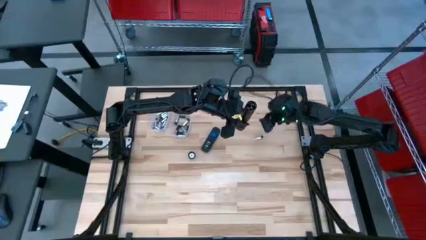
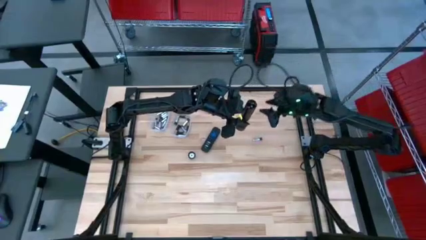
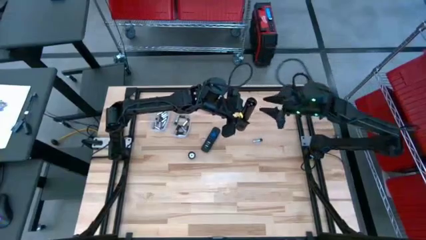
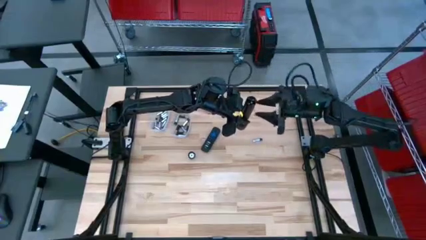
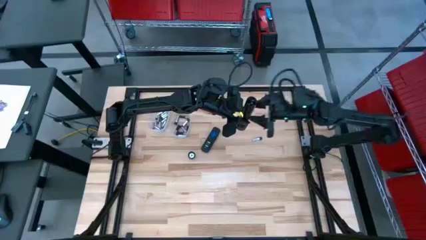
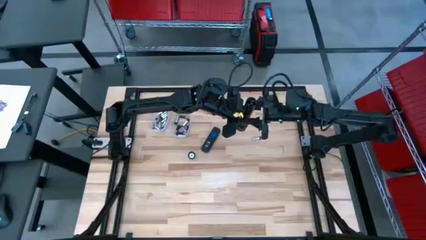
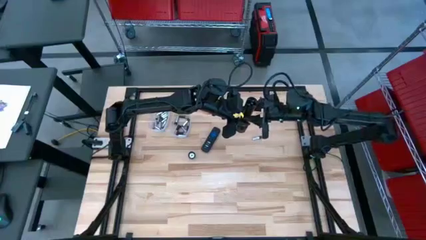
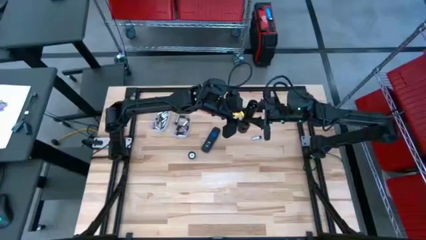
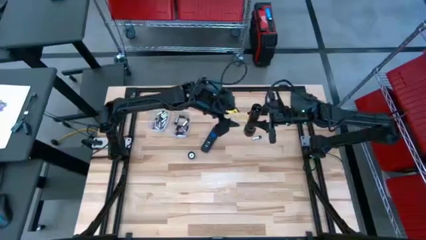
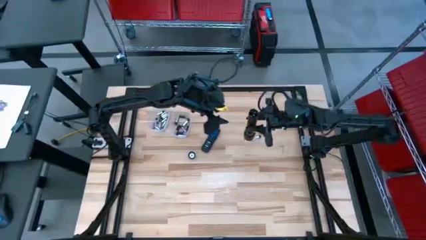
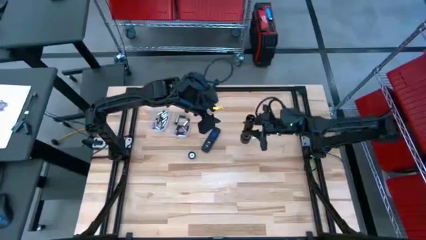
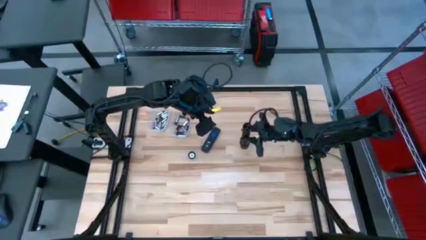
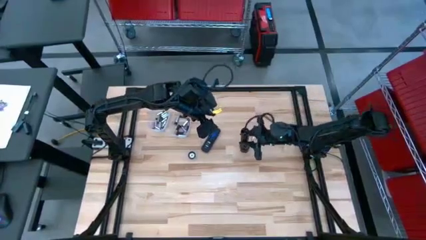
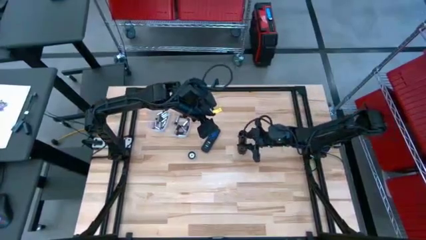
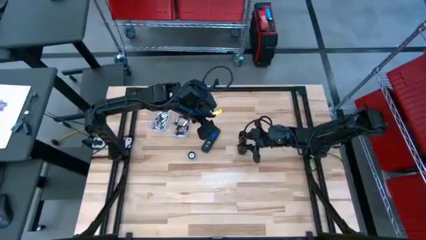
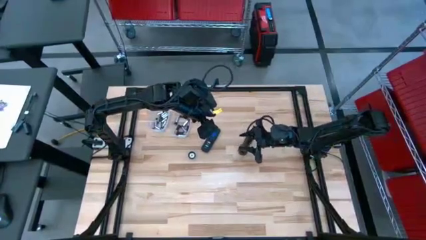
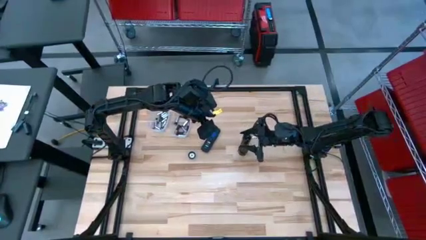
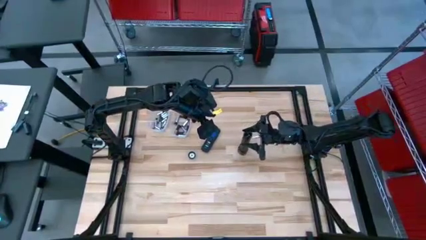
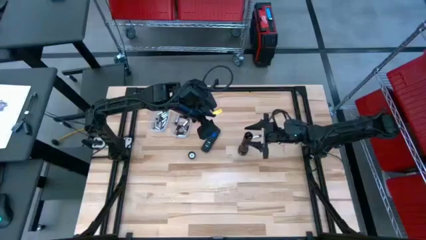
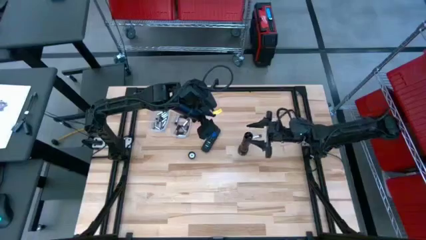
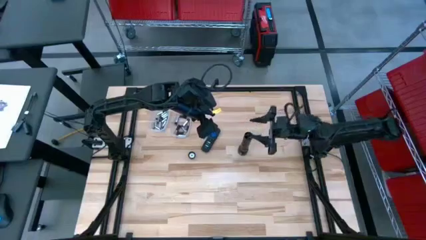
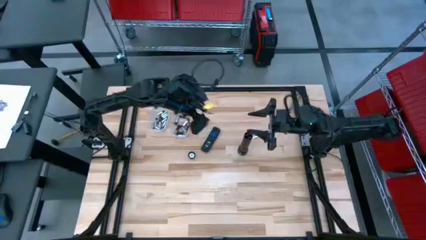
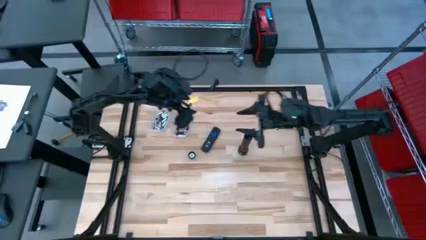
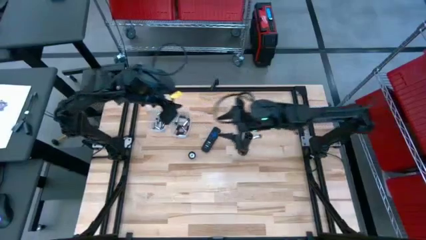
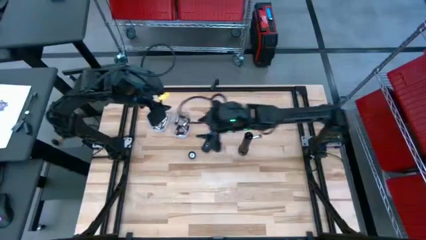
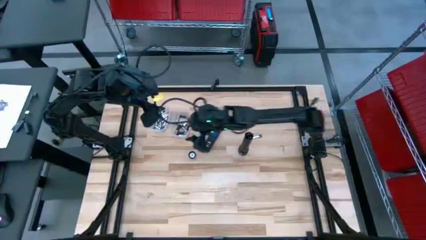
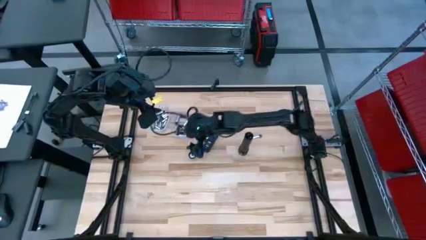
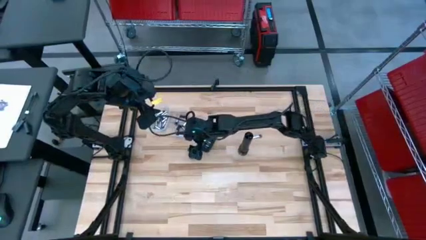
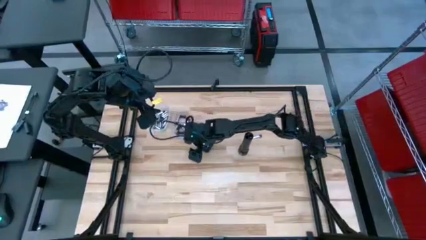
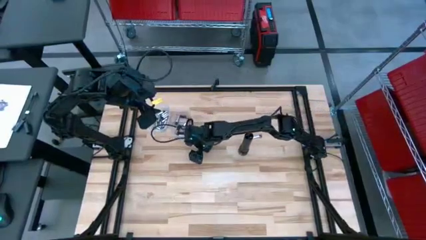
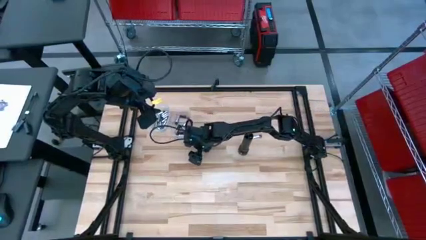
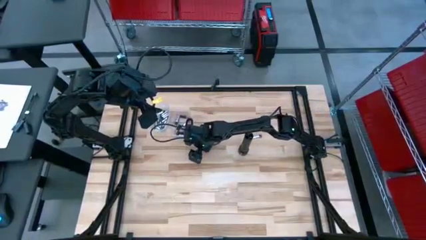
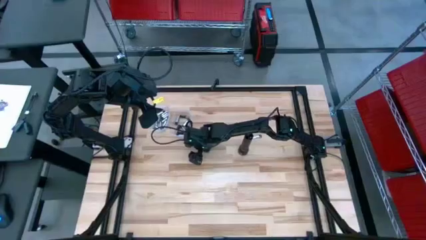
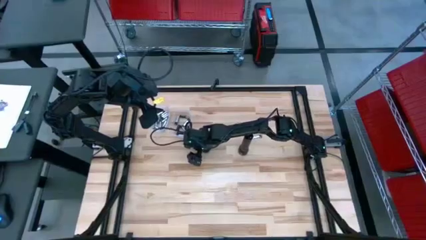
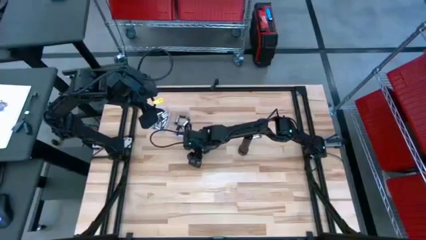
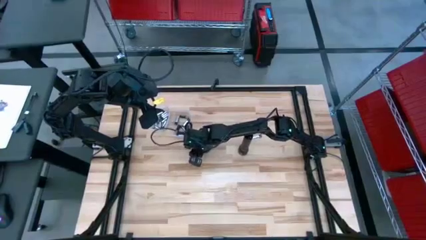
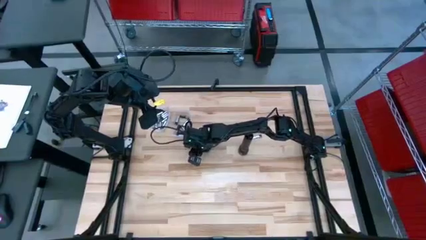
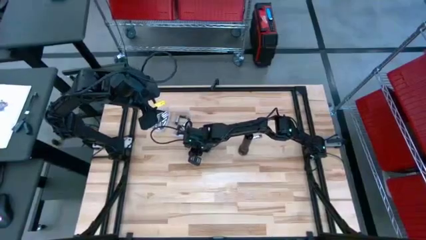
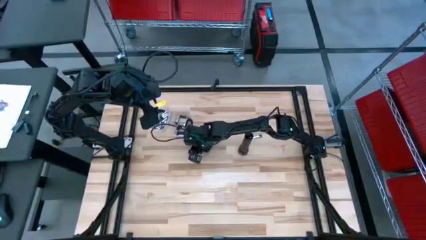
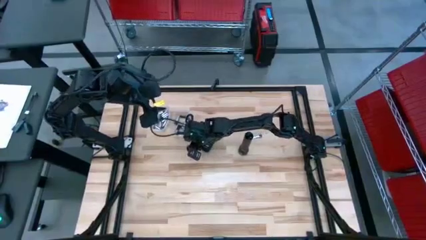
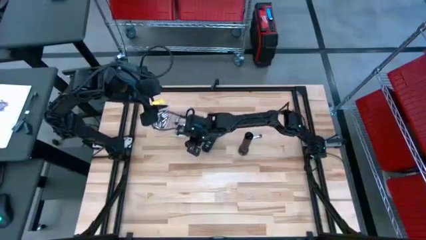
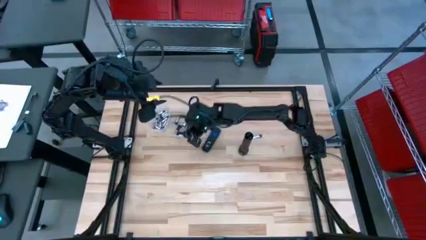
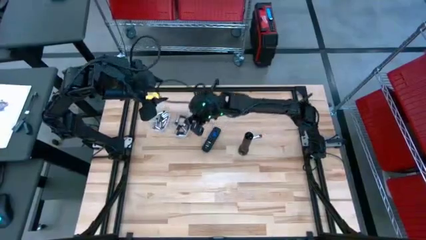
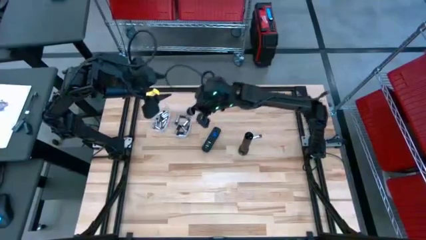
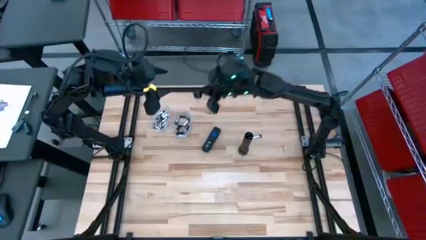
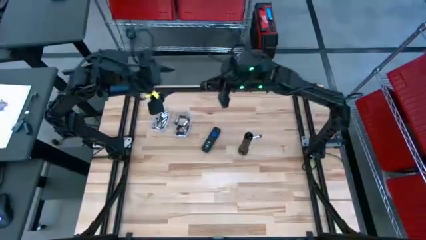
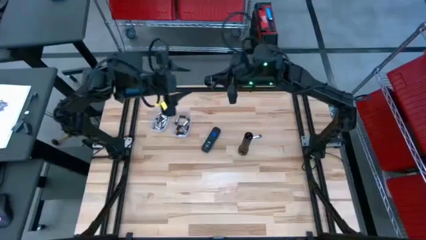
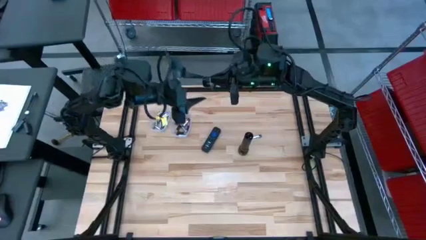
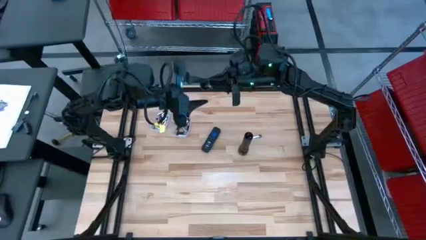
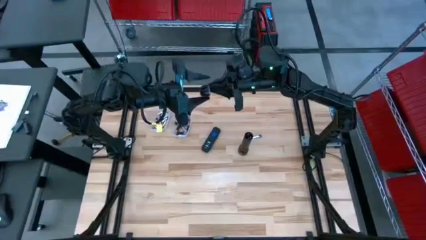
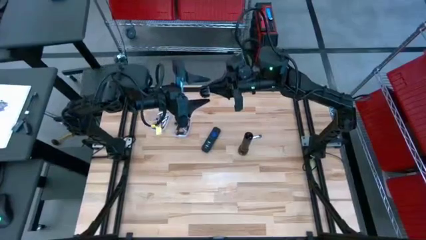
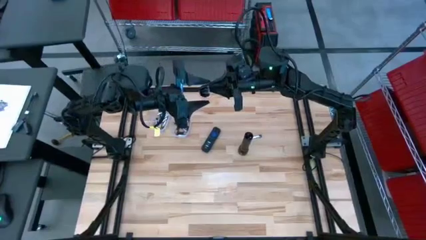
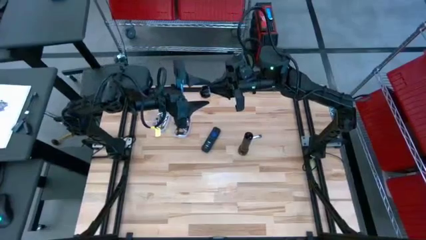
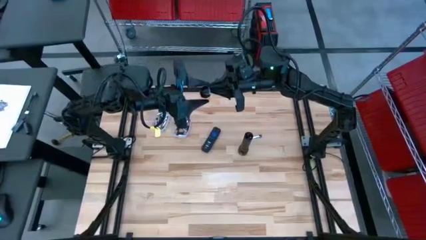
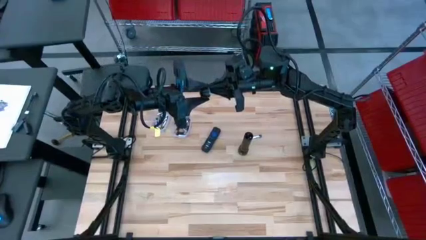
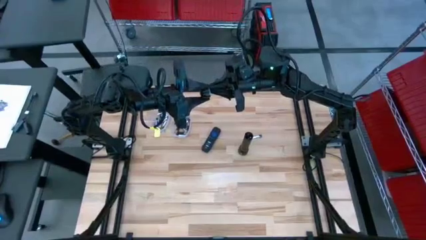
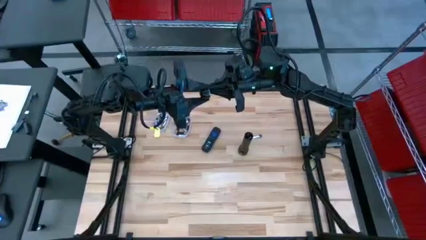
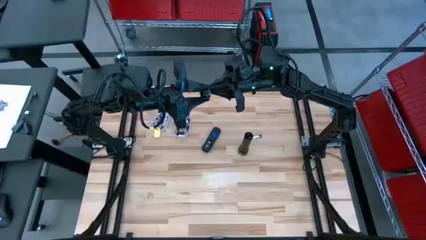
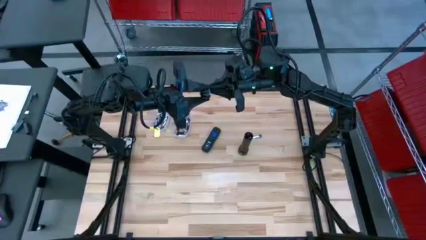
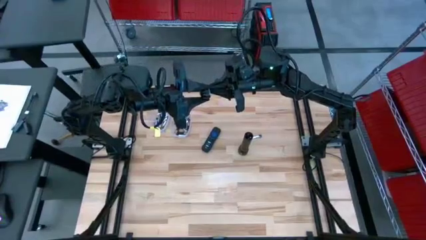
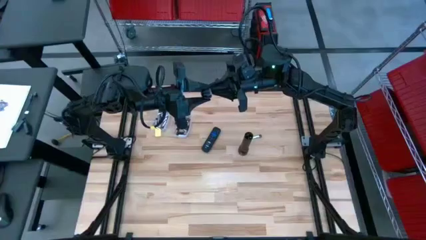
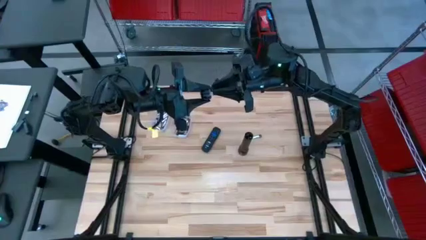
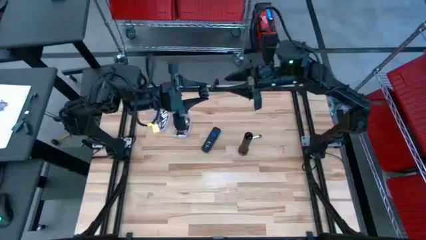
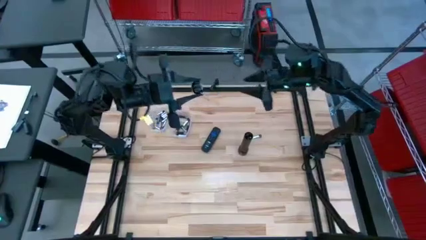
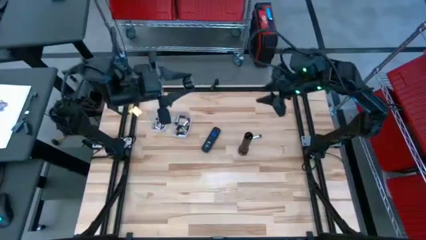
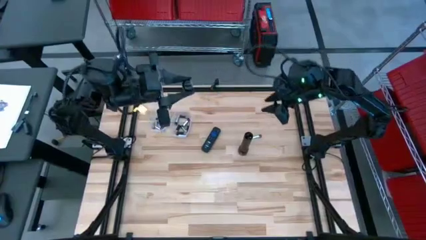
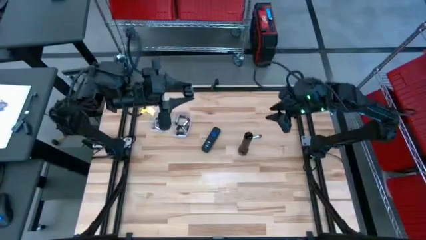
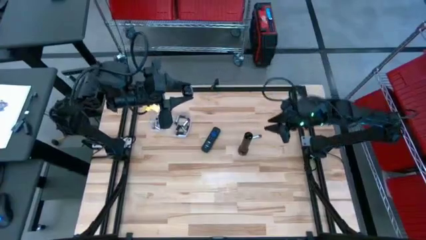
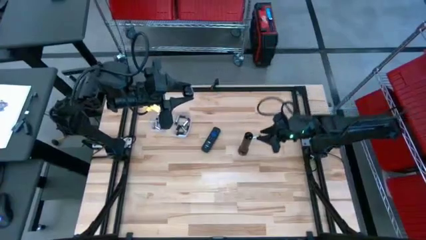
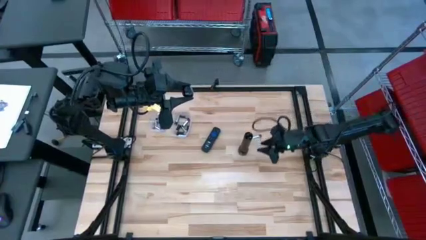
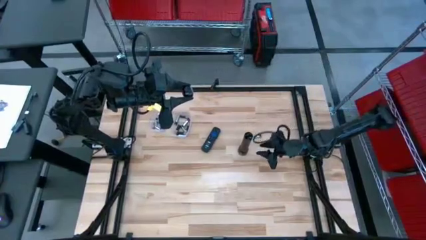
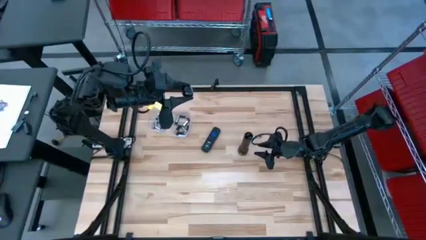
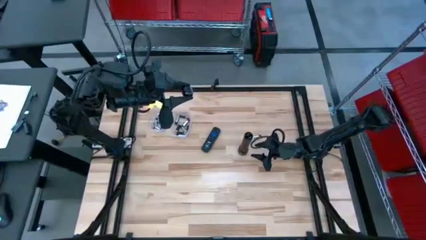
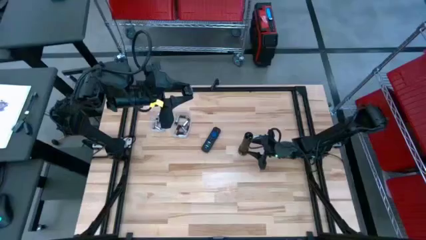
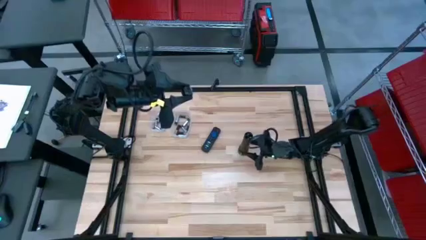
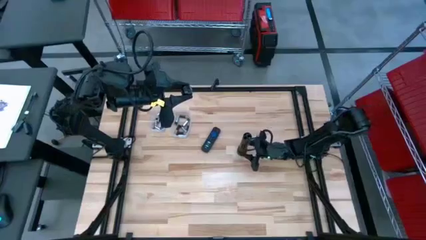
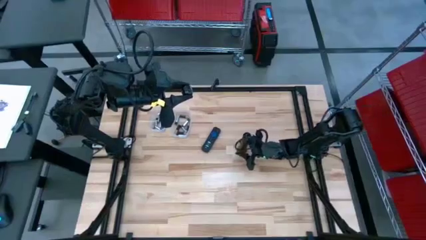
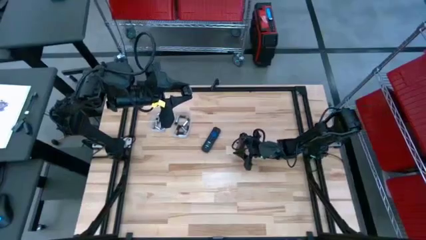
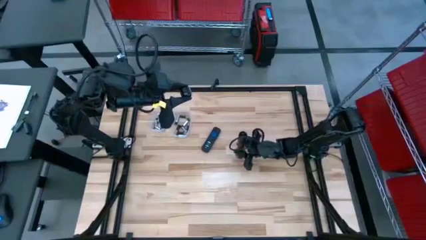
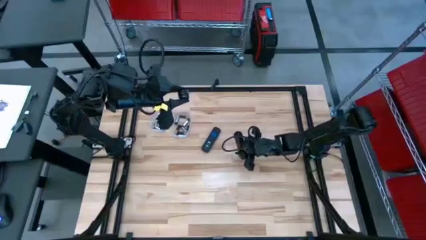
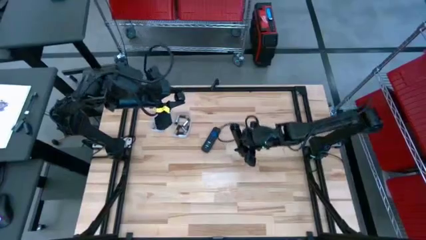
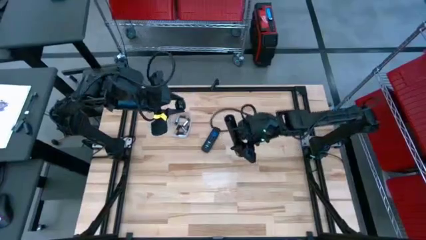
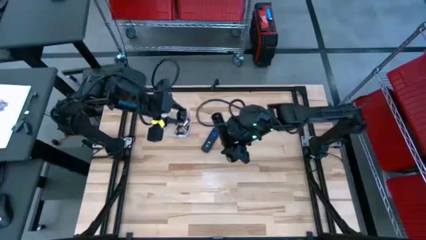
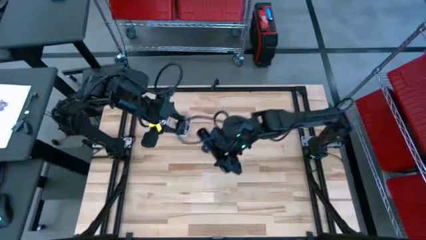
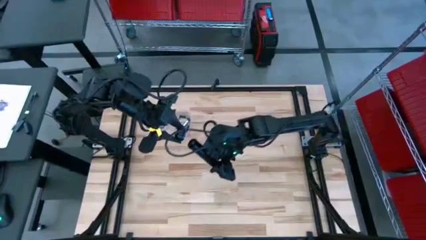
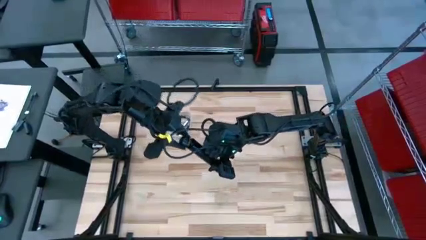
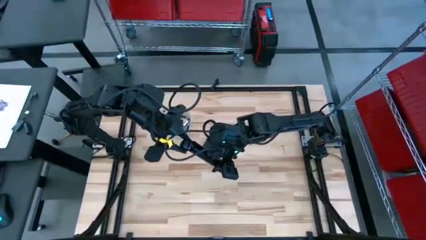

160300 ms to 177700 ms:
Task: Insert battery
Close the flashlight battery compartment
